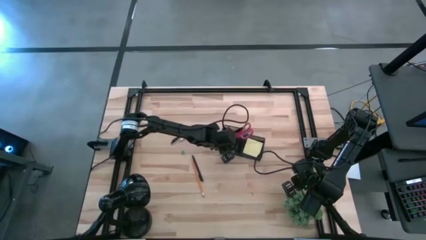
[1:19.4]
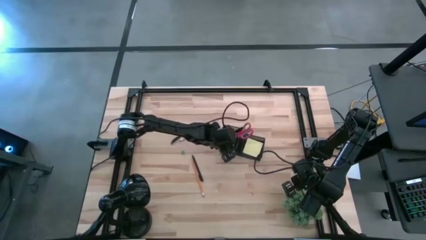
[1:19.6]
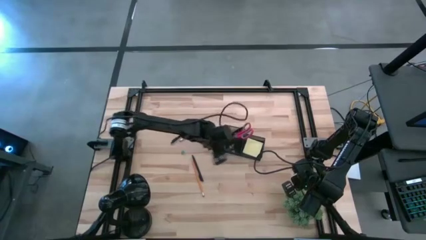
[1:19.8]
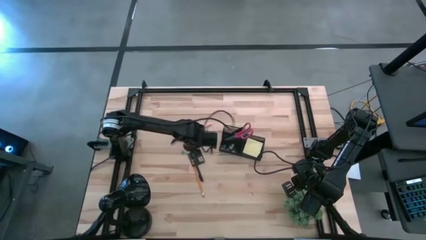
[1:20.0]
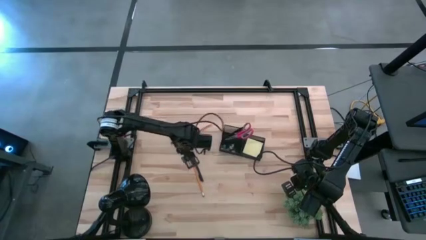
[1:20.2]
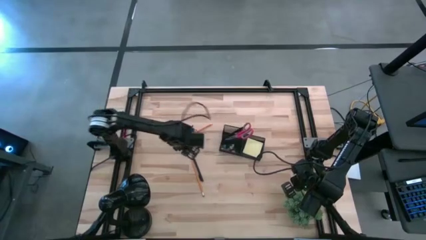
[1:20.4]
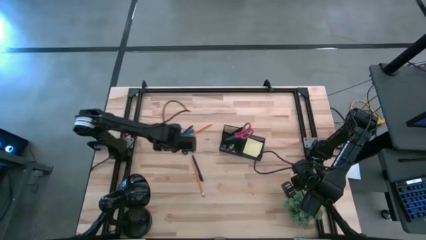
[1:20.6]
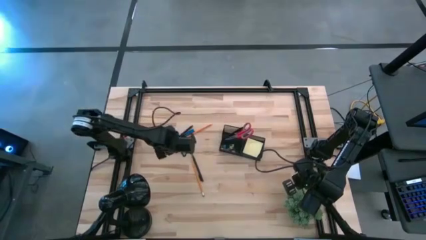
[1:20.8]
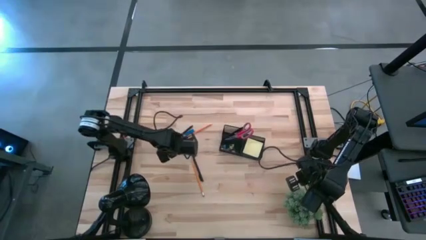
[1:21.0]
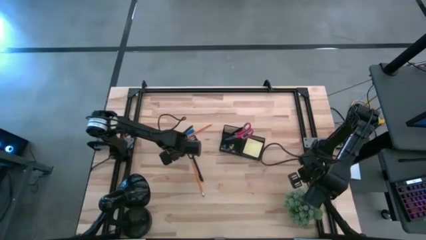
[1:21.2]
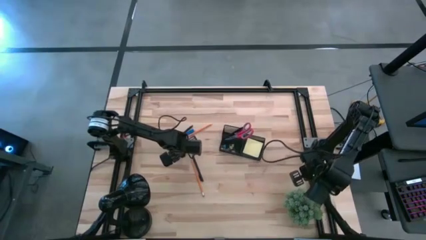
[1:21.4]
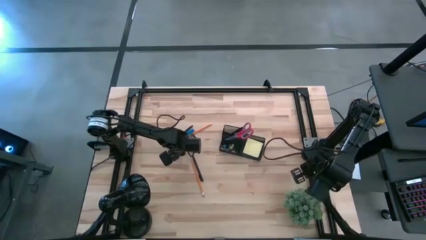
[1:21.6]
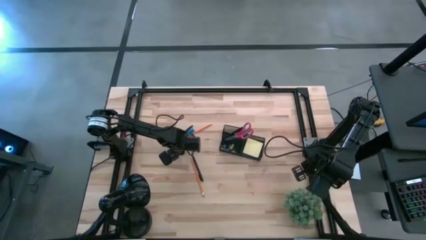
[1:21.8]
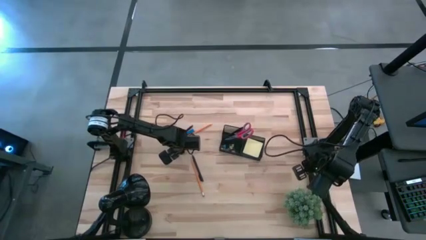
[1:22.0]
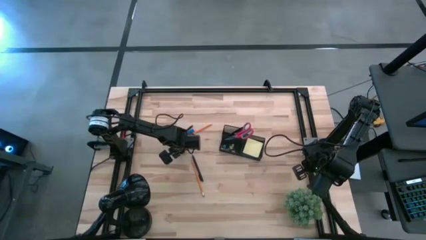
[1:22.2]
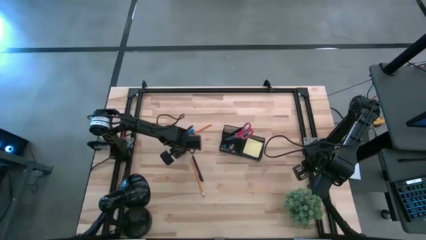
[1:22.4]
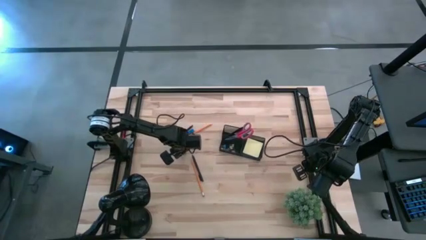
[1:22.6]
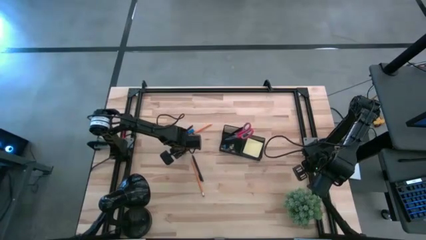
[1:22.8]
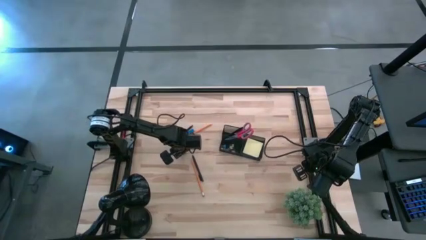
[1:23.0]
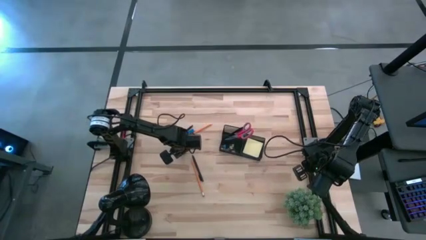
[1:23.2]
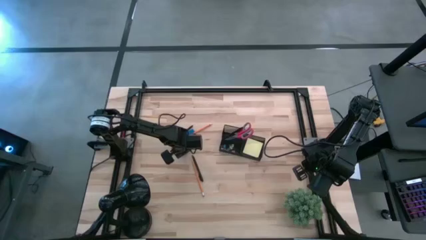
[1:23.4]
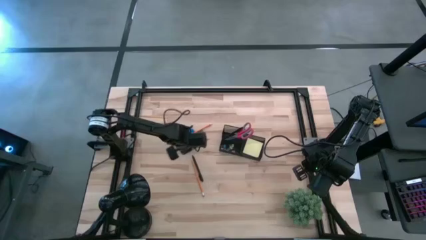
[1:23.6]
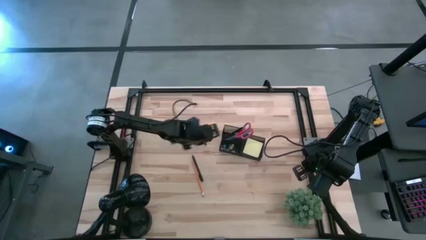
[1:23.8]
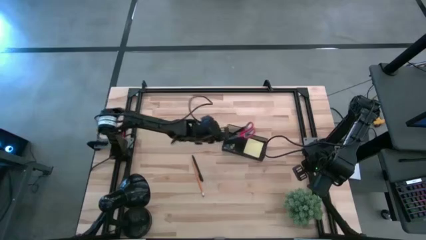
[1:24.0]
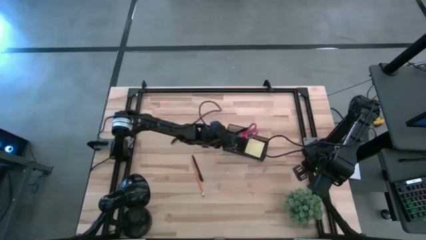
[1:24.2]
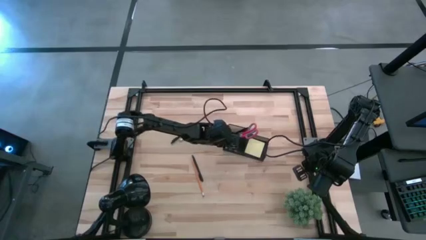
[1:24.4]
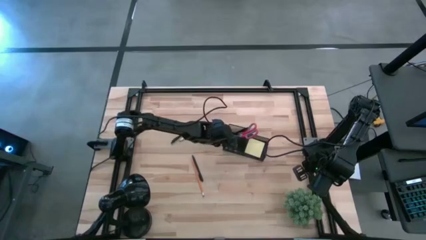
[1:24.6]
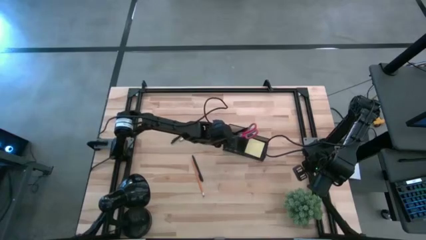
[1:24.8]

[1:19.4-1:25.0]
Task: Pick and place office supplies into organizer
Put the blue binder clip into the desk organizer

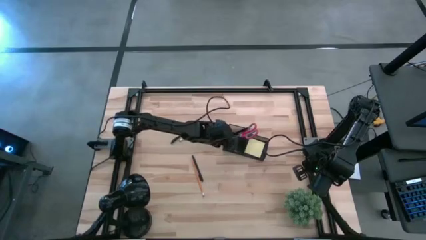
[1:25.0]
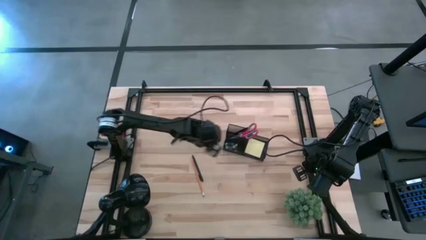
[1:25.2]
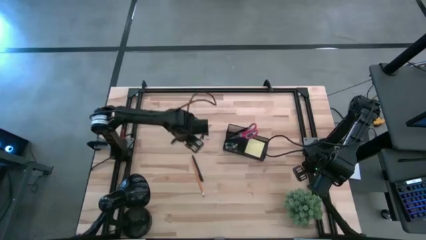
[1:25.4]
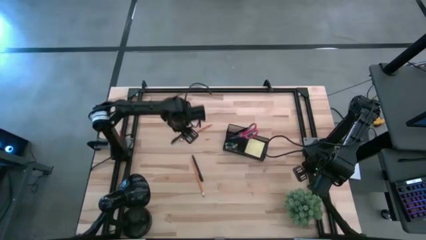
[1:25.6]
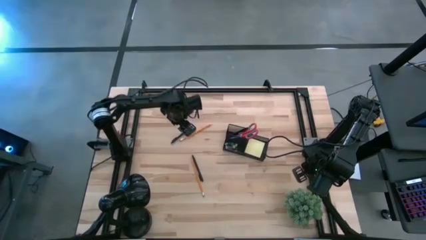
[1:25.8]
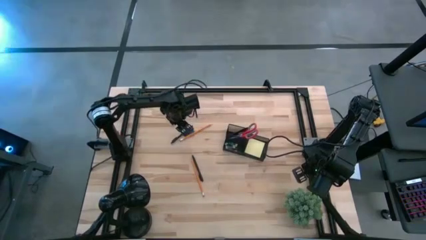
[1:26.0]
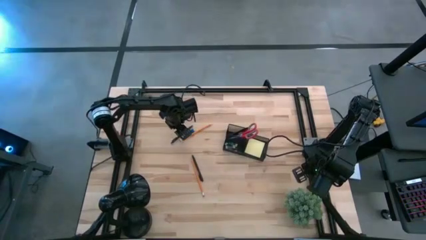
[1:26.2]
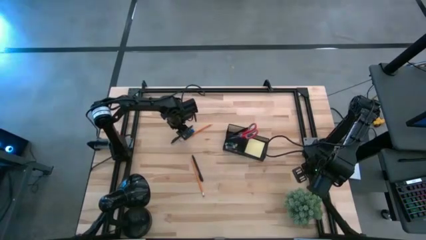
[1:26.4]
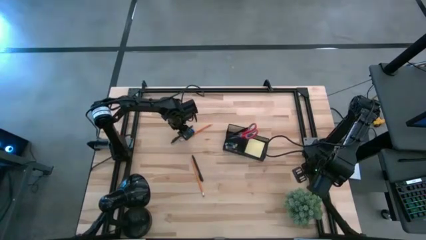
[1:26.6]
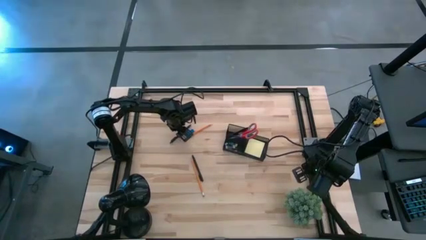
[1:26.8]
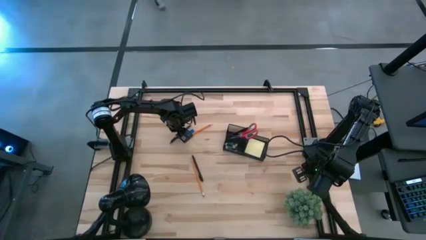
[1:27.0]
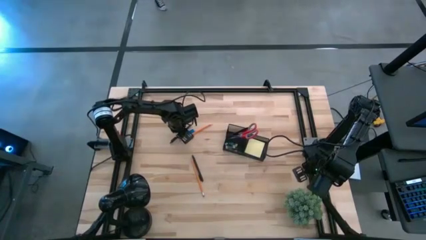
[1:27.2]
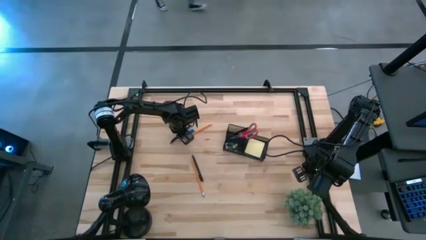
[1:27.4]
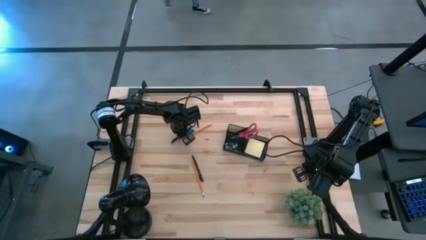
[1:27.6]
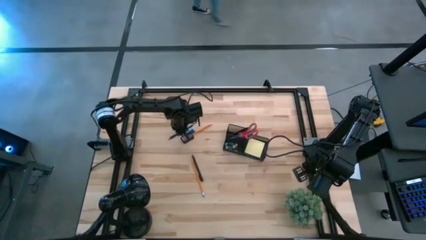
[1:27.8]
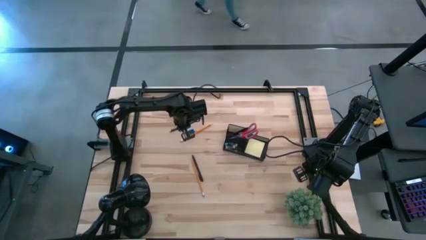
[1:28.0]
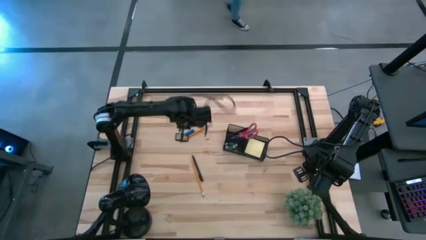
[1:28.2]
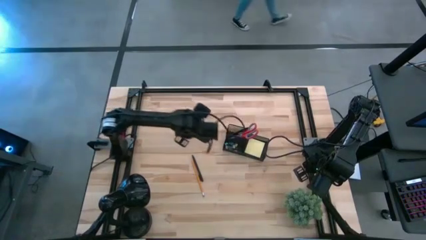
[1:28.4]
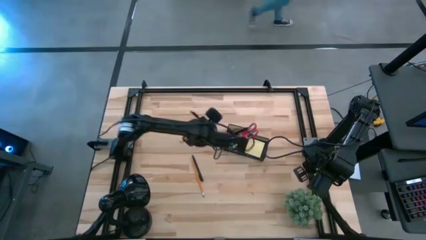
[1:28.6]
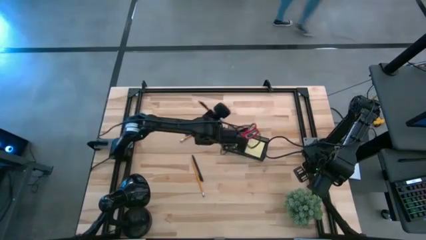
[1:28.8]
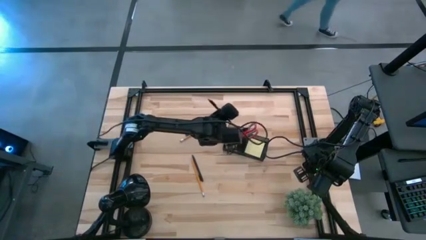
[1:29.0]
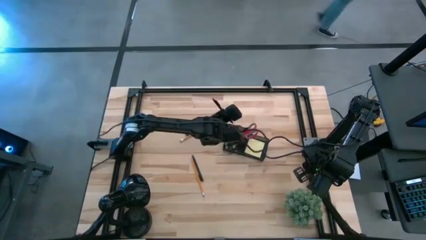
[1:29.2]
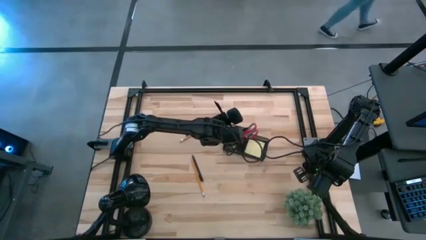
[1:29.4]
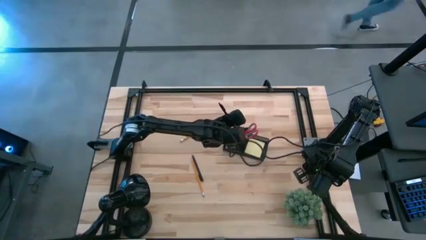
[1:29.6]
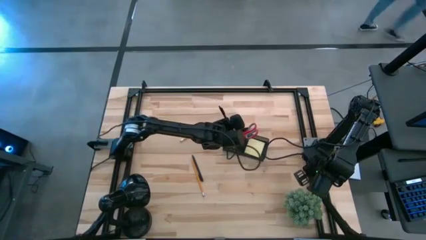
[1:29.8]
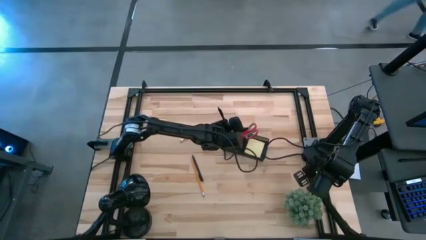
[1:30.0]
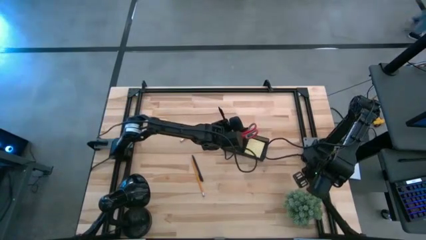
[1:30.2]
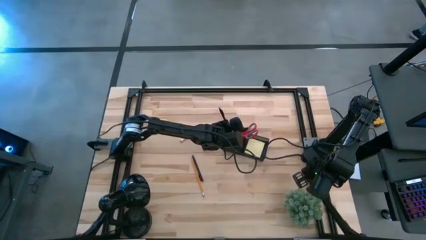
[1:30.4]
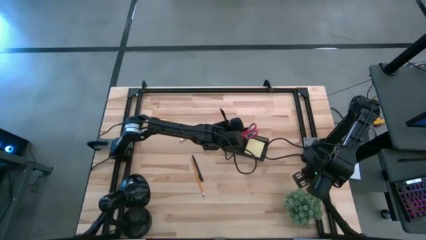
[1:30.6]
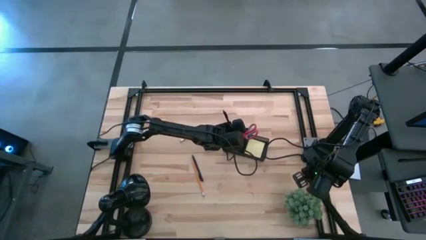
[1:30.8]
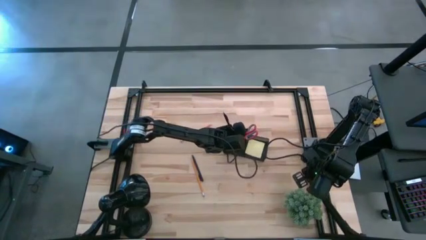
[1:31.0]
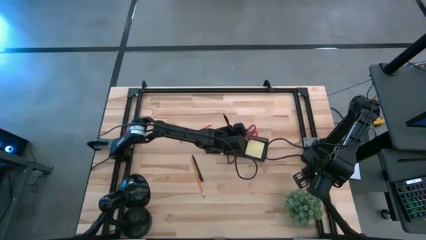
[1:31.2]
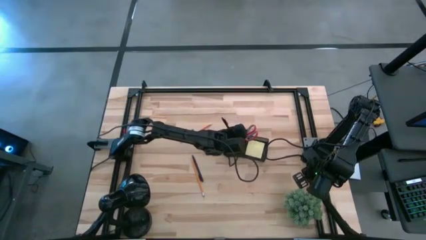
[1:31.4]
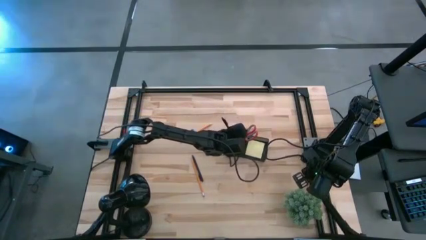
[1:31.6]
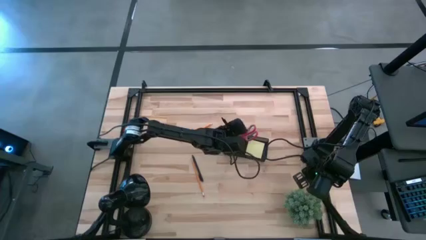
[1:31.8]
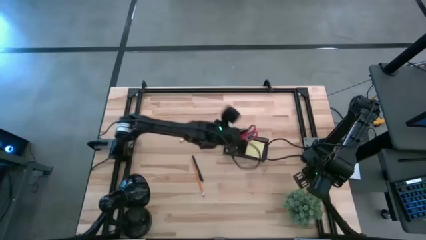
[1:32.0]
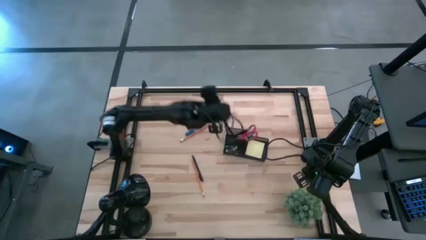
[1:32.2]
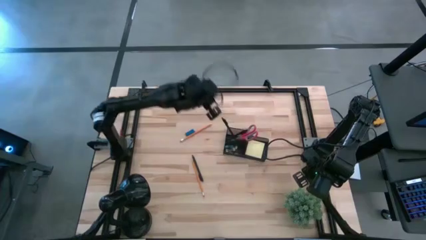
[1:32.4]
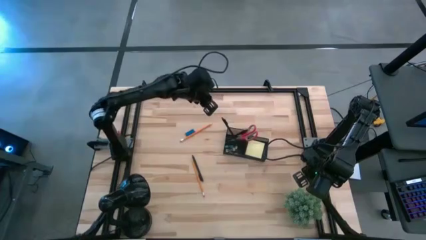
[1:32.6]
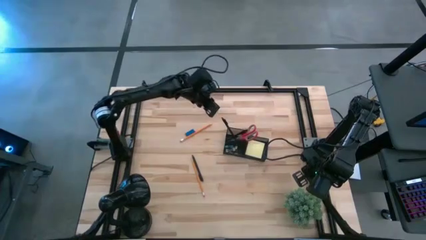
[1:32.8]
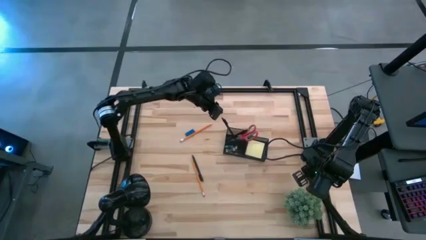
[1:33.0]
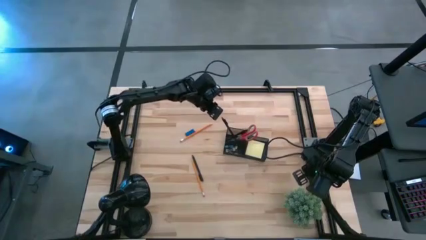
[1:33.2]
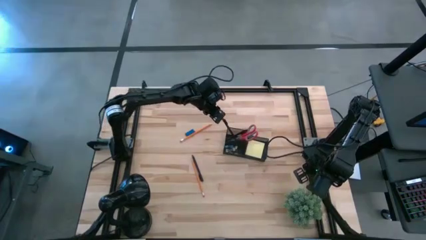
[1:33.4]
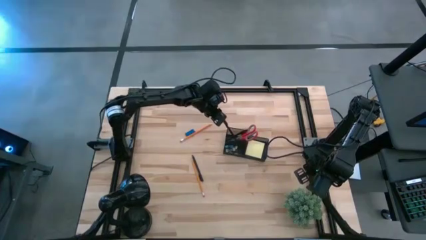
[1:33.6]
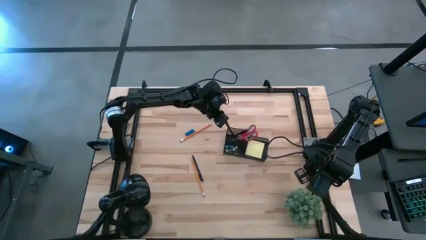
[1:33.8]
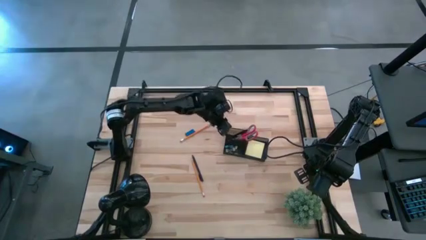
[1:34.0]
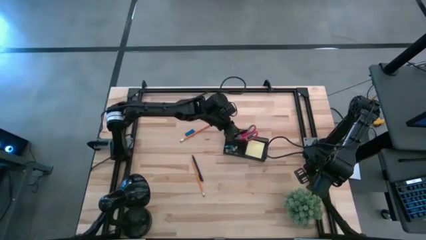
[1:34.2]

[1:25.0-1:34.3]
Put the top pen into the desk organizer
